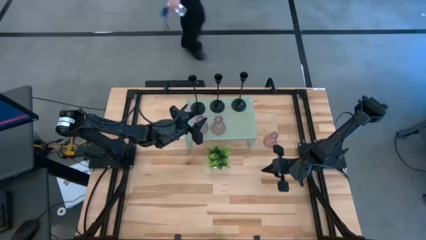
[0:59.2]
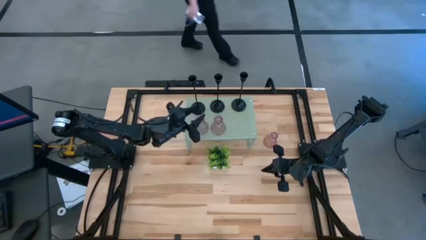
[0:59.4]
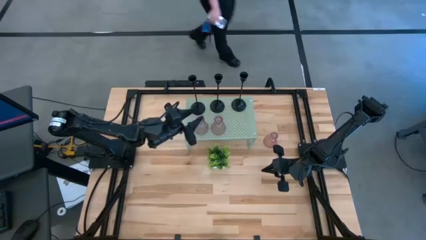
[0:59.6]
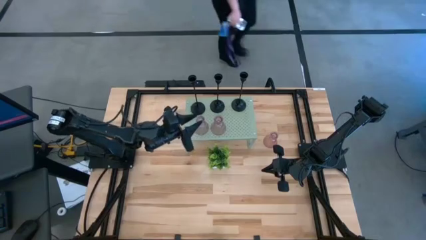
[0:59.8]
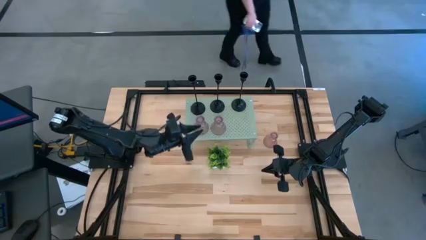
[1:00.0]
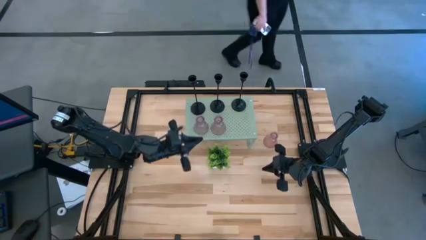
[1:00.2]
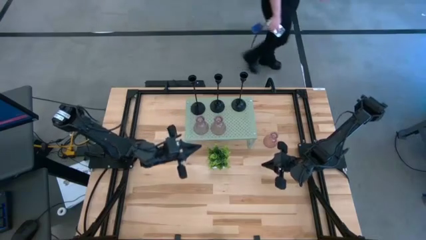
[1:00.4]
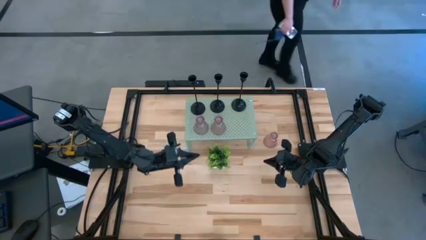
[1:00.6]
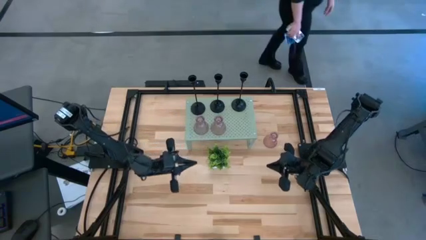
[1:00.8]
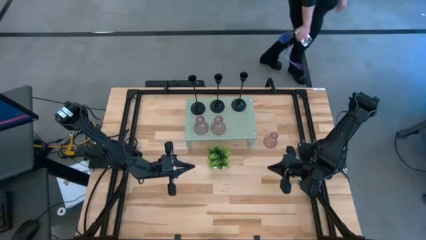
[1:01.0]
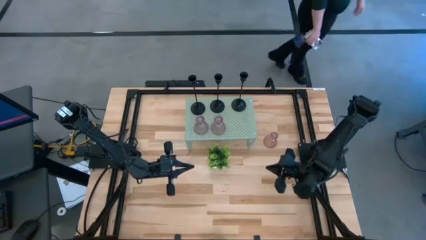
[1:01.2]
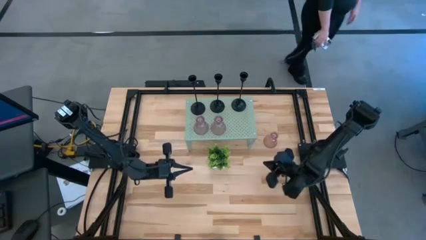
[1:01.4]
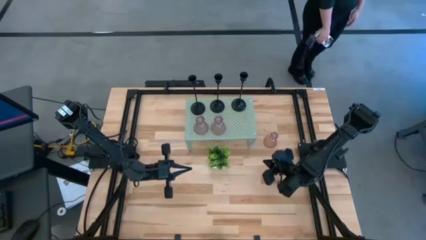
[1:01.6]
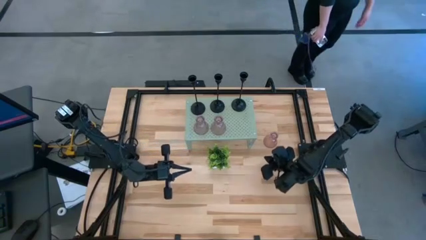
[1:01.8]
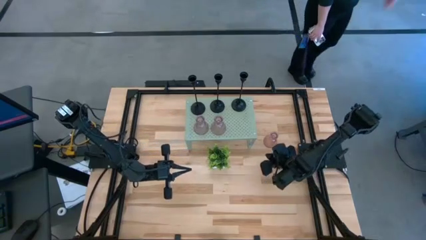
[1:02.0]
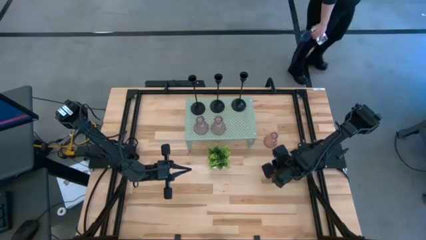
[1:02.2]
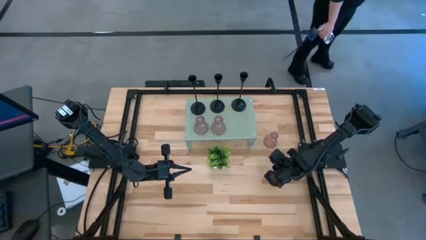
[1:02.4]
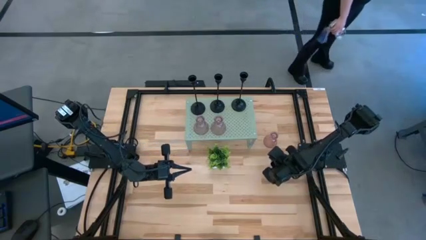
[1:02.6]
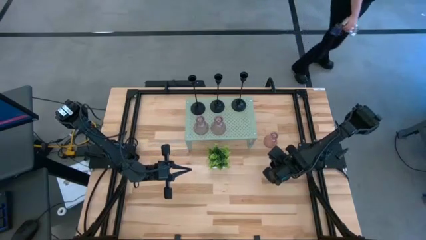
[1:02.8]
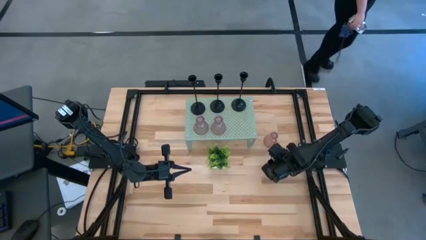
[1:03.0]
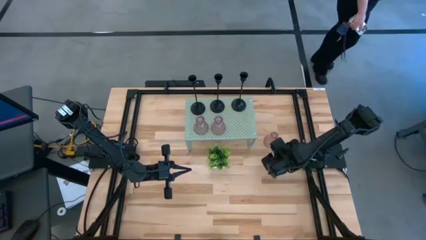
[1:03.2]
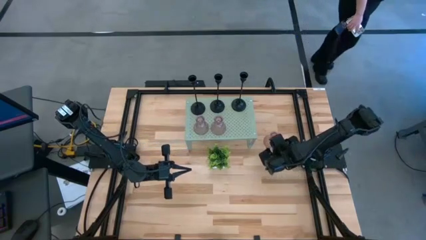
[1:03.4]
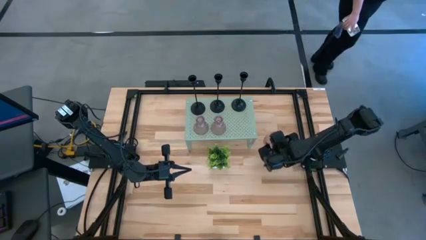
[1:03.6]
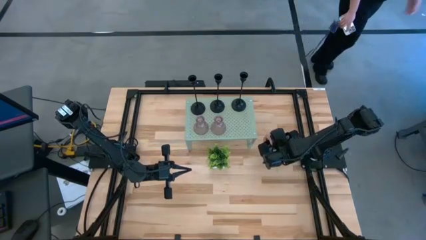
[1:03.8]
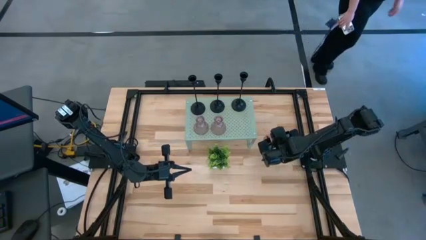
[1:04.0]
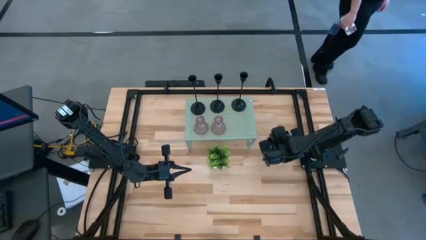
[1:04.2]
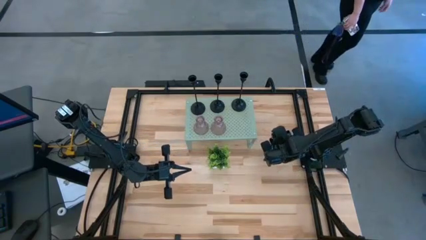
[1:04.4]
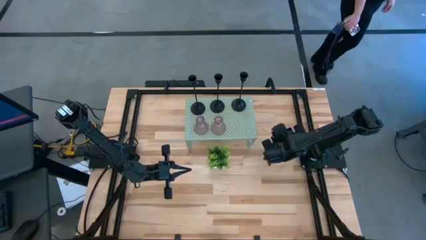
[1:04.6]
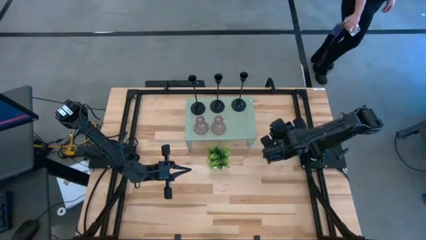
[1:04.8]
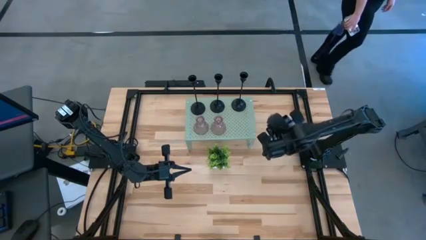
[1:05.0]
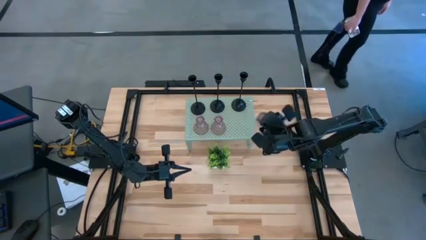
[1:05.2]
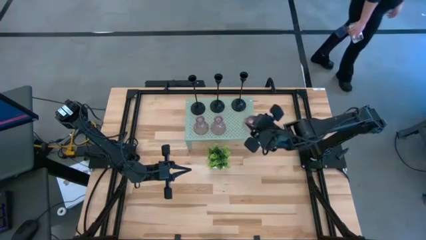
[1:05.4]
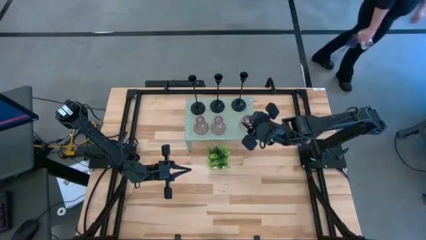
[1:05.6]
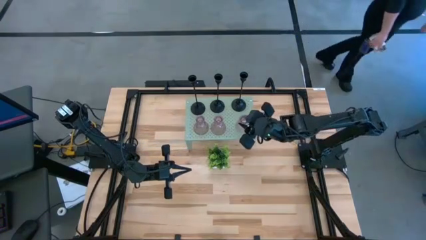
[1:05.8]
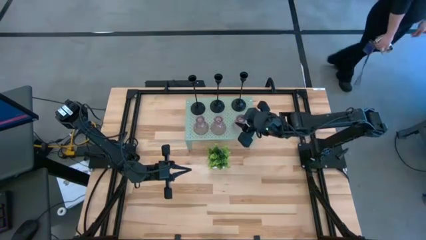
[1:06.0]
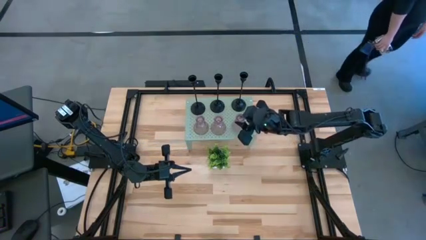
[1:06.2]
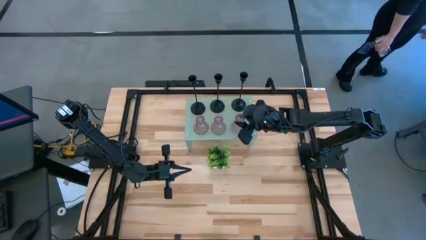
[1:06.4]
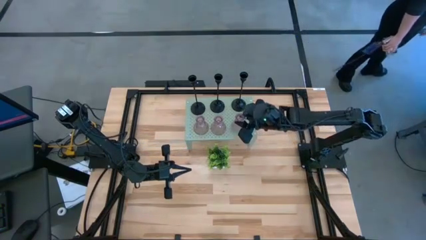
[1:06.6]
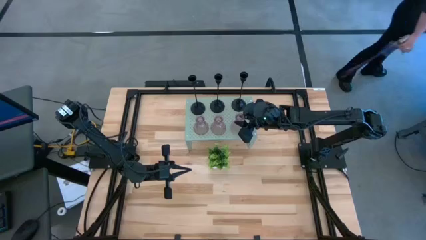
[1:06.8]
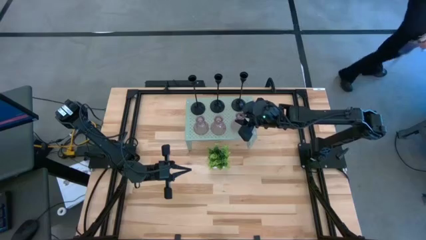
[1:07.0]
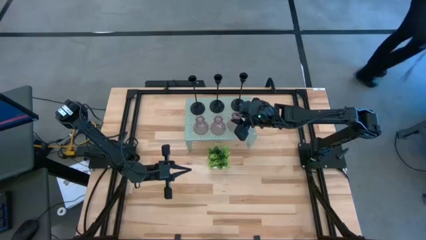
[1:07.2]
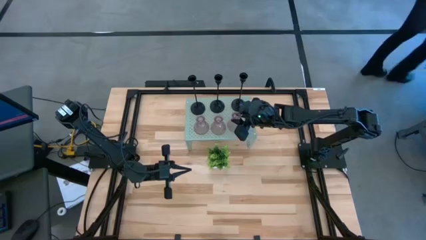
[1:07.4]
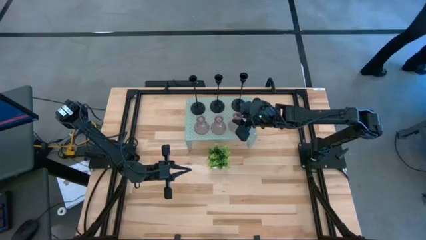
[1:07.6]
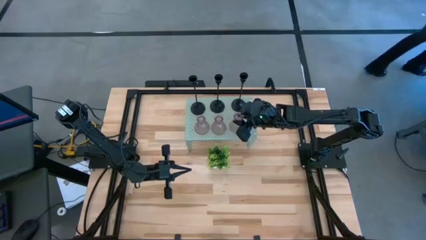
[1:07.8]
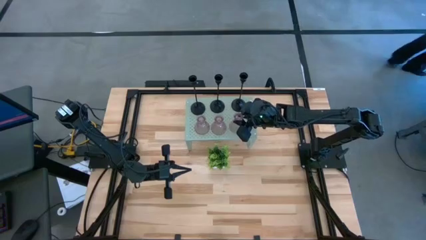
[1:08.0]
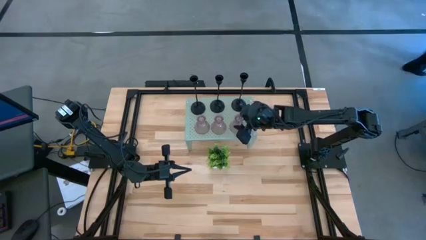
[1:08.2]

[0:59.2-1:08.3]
Task: Pick & Place candle stick holders
Put the pink glass candle holder on the shelf

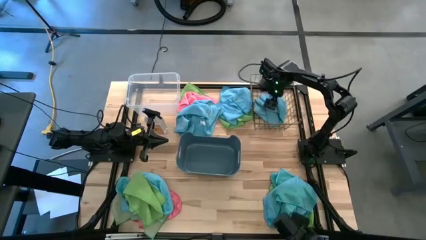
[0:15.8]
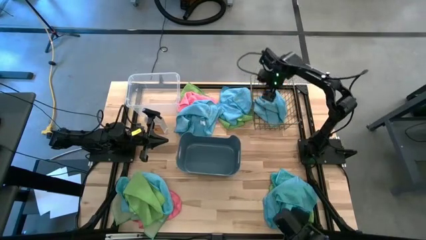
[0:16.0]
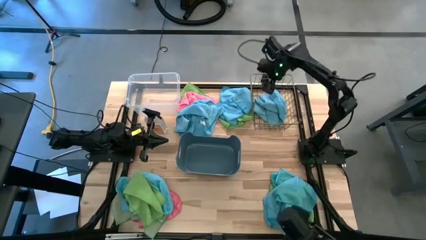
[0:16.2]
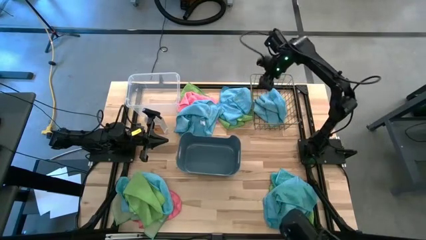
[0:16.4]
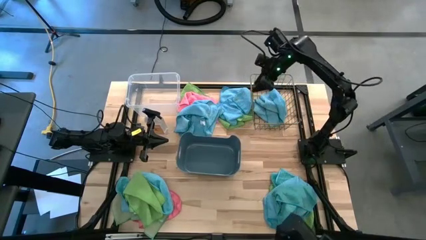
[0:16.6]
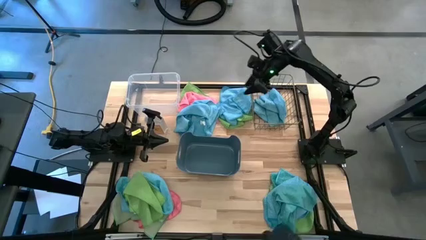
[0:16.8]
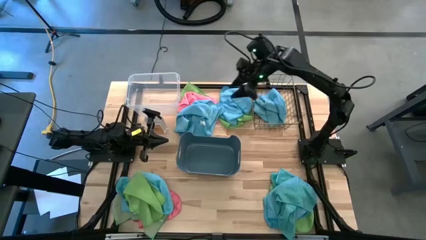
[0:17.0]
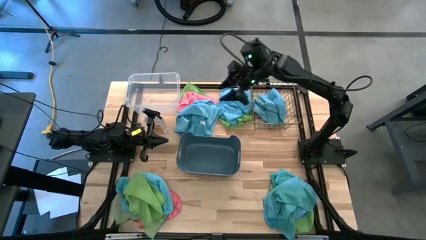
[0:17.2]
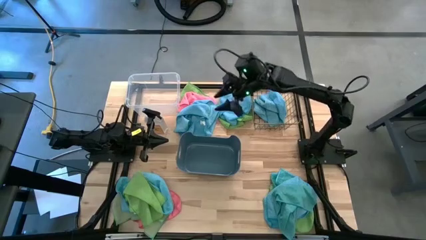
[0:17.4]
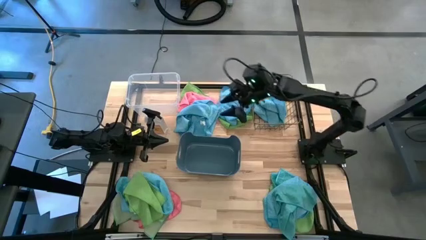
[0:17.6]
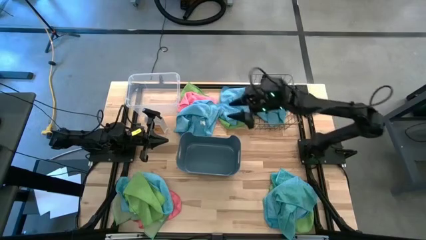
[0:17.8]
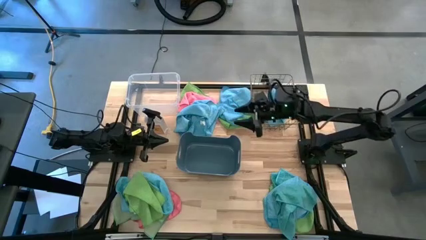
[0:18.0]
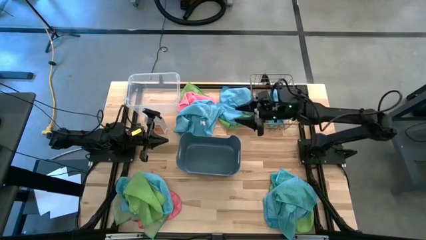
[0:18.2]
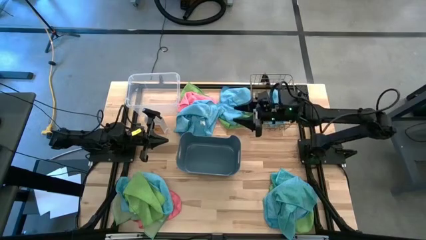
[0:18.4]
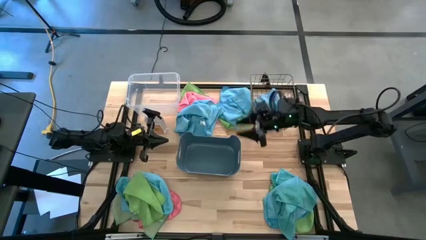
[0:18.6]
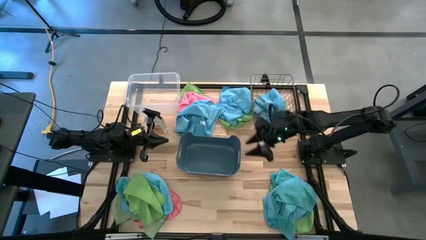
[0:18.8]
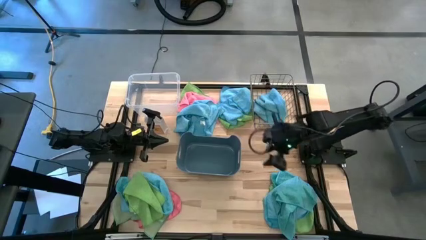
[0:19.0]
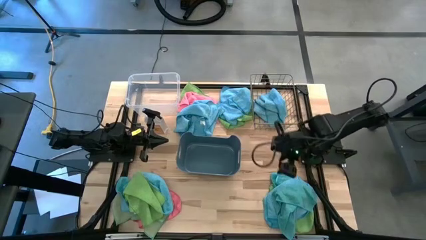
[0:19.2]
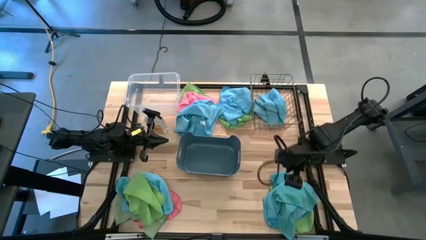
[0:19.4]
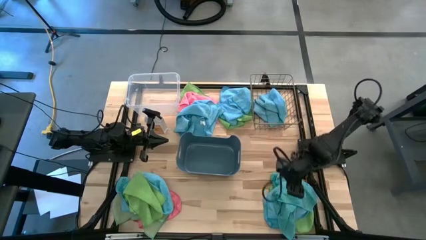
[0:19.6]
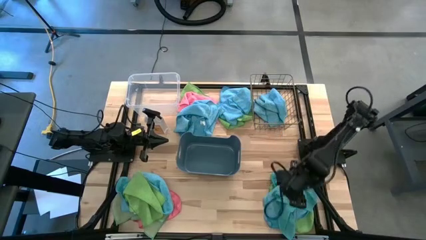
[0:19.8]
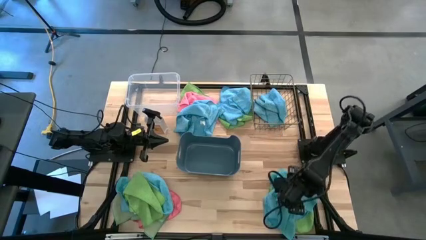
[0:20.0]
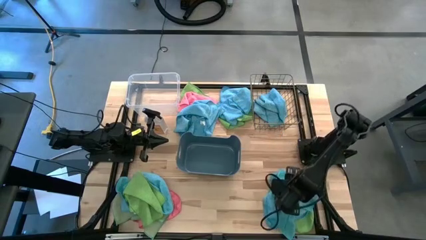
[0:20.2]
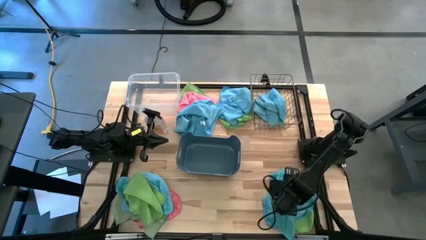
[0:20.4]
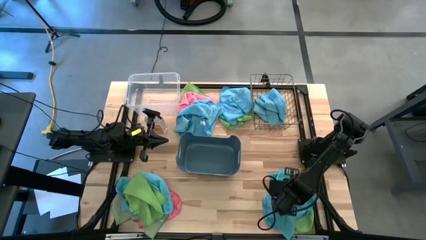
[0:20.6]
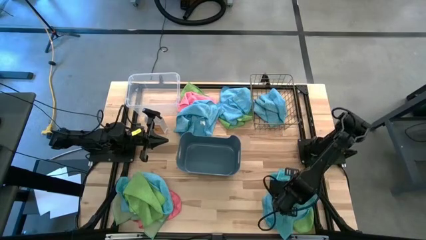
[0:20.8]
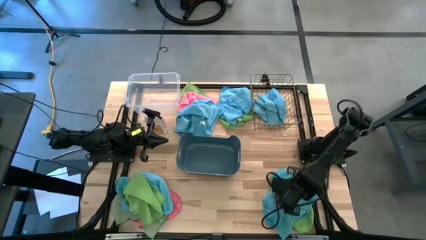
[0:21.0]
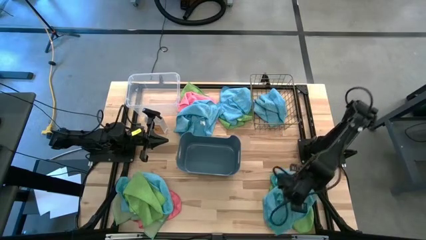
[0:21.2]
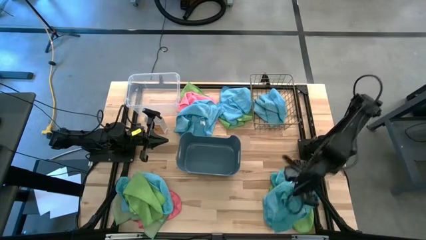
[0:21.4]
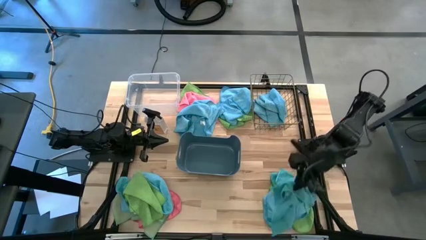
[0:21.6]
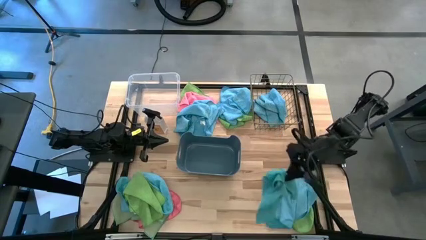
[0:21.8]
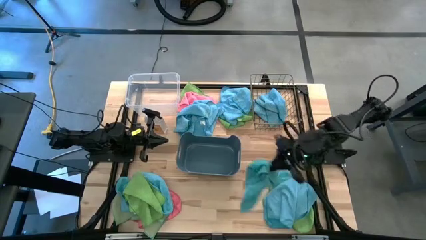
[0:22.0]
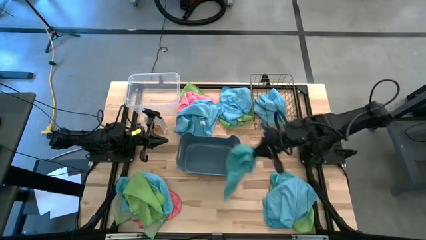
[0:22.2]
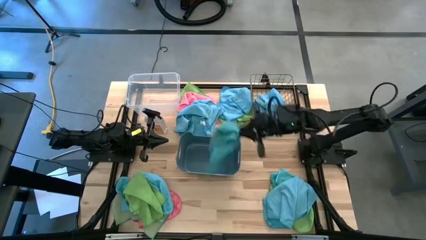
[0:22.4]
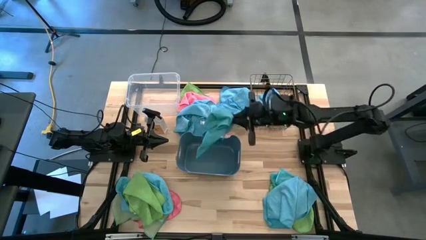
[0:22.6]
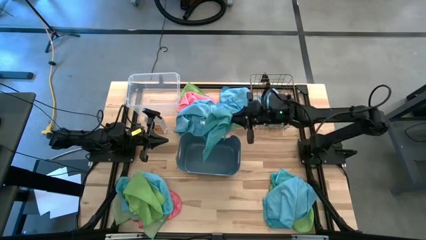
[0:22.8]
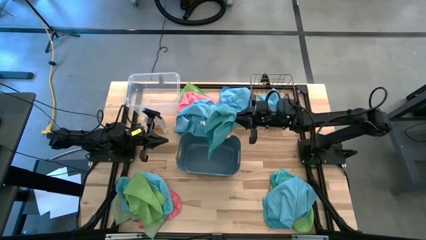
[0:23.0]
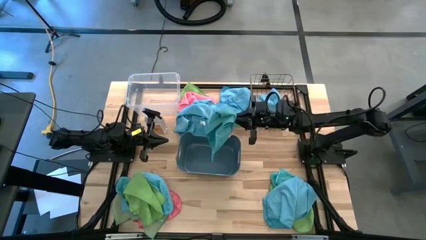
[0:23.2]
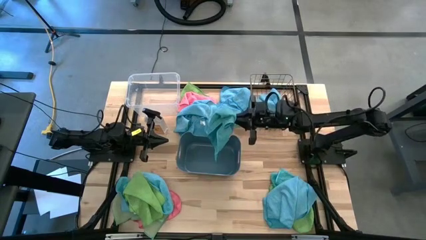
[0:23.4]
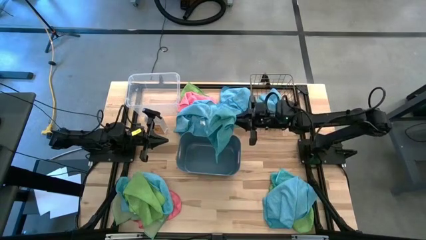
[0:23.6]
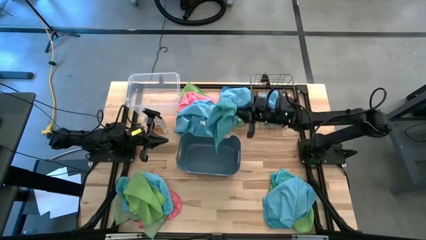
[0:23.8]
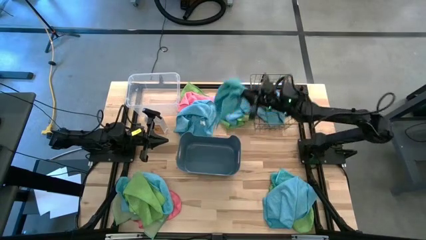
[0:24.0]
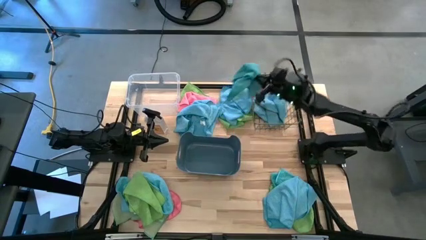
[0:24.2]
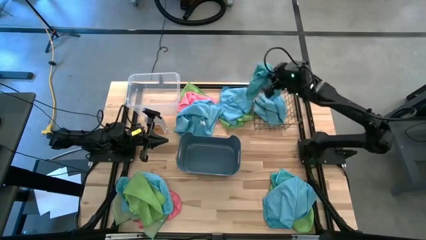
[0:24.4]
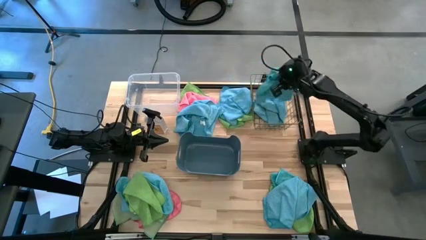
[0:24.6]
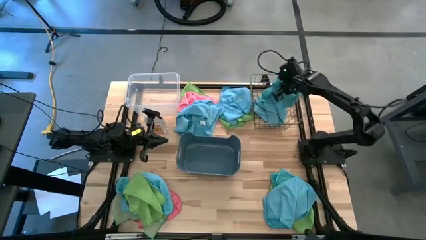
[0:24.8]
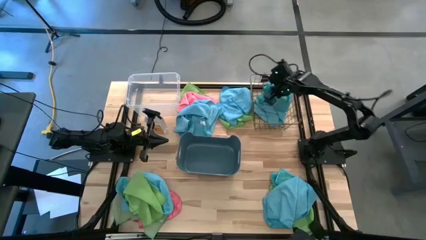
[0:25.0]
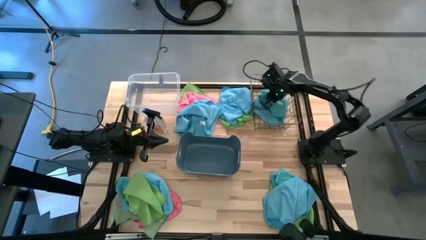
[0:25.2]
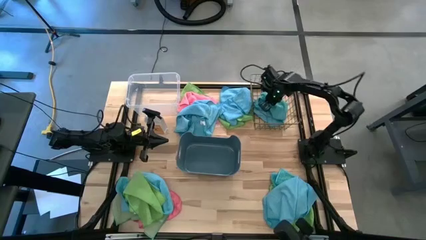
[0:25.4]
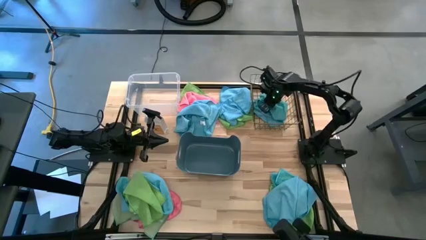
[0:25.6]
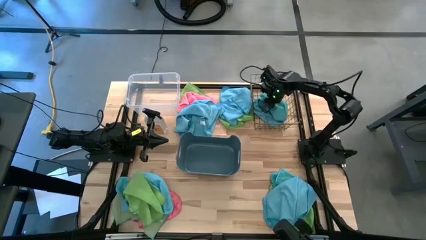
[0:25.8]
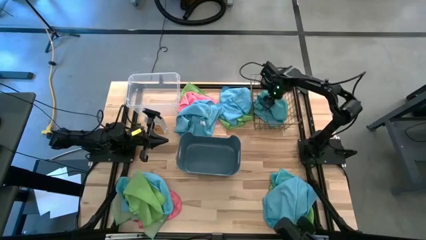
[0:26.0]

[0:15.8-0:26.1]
Task: Sort microfiber towel by color & place in baskets
Put the blue microfiber cloth into the gold wire basket
